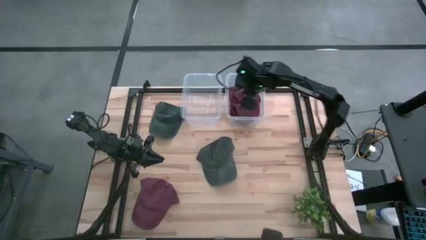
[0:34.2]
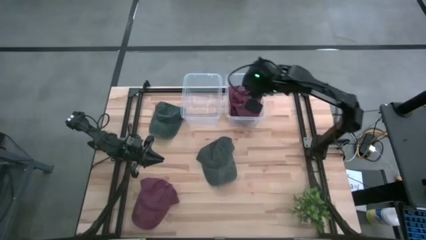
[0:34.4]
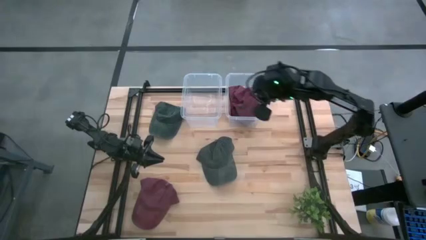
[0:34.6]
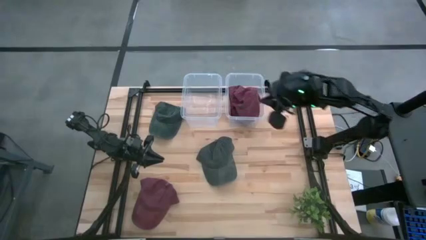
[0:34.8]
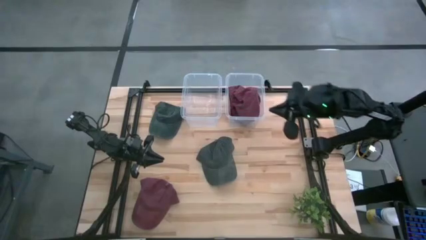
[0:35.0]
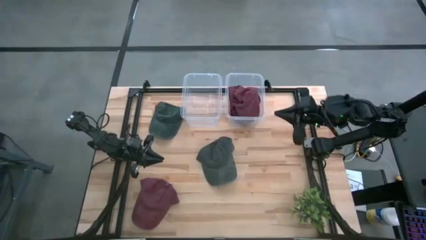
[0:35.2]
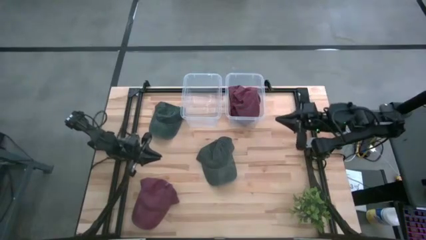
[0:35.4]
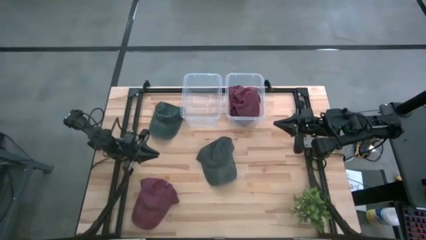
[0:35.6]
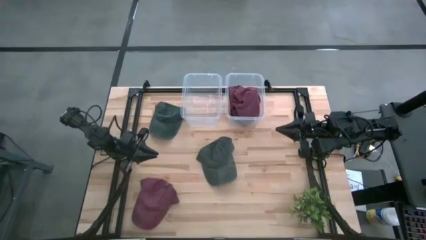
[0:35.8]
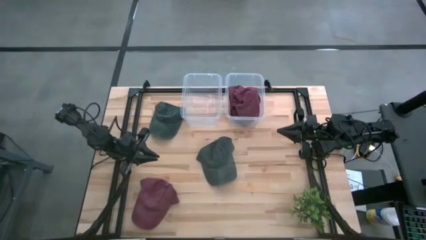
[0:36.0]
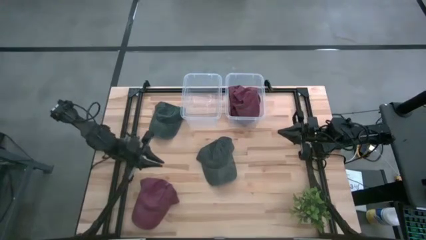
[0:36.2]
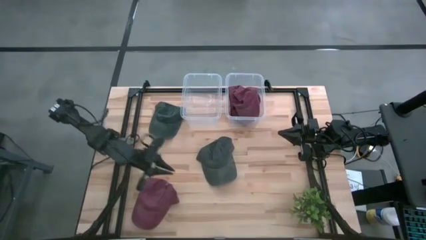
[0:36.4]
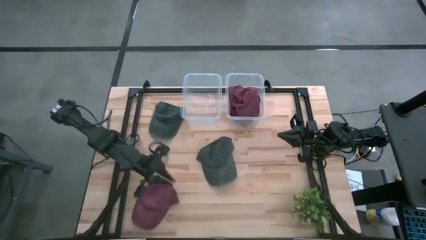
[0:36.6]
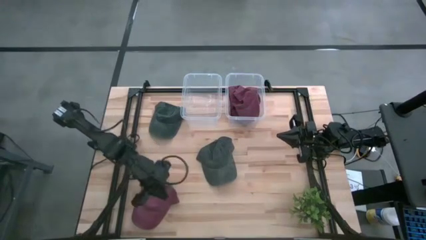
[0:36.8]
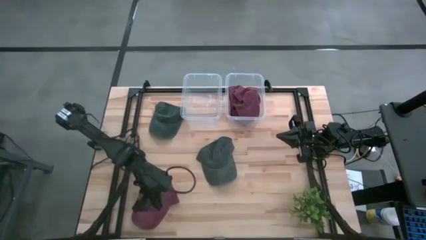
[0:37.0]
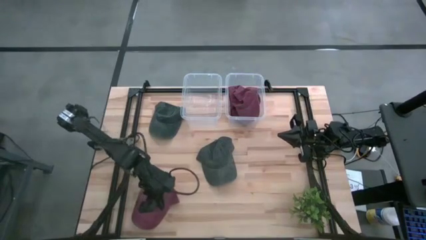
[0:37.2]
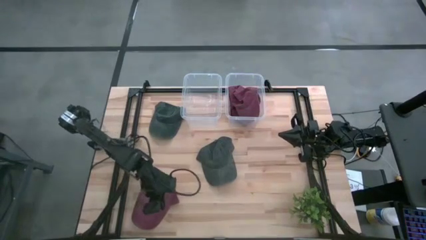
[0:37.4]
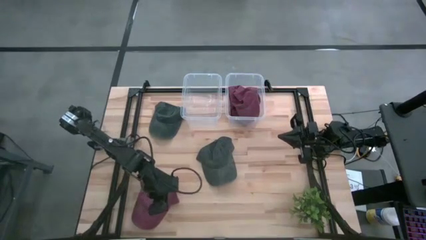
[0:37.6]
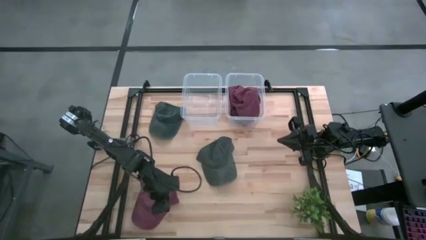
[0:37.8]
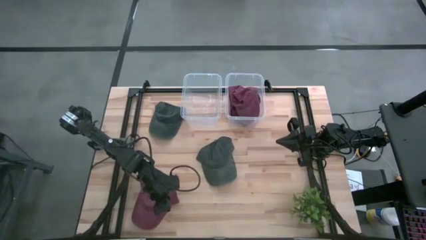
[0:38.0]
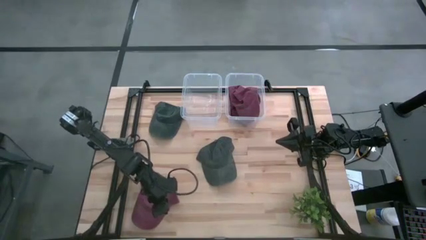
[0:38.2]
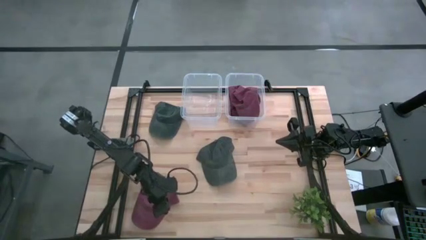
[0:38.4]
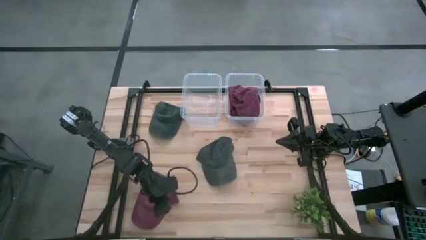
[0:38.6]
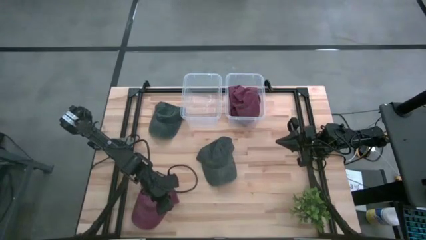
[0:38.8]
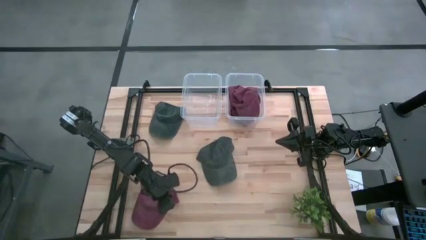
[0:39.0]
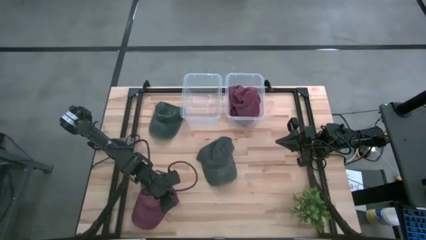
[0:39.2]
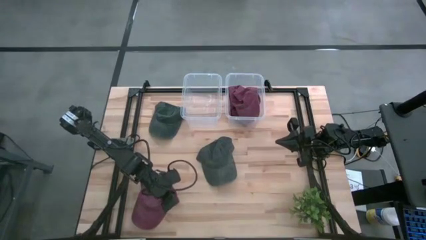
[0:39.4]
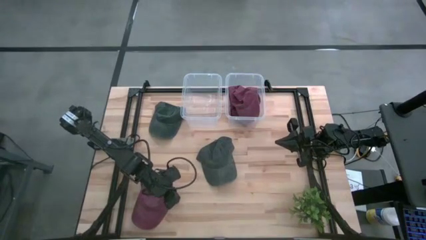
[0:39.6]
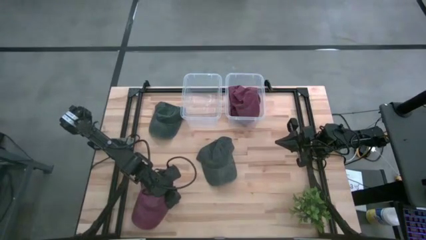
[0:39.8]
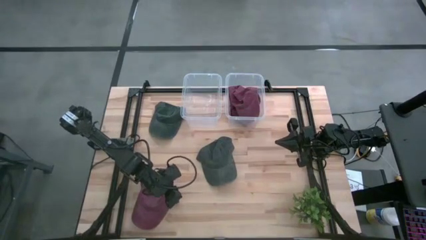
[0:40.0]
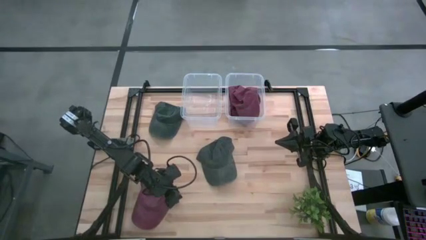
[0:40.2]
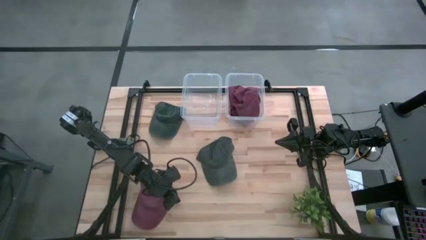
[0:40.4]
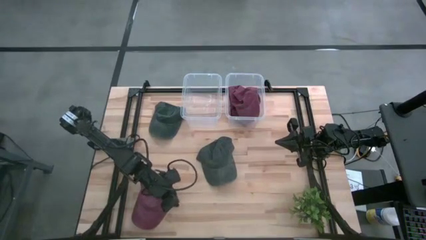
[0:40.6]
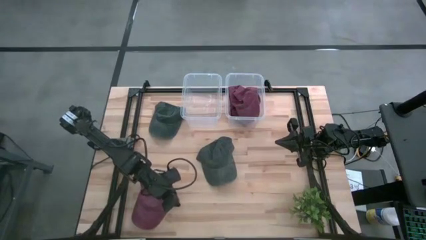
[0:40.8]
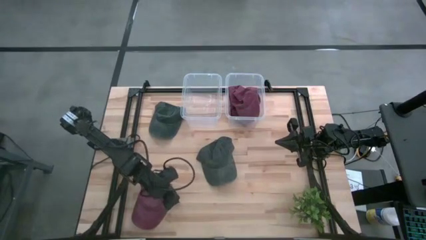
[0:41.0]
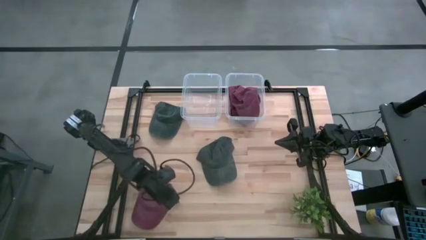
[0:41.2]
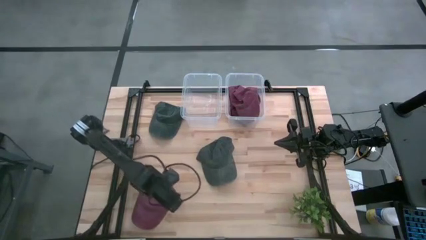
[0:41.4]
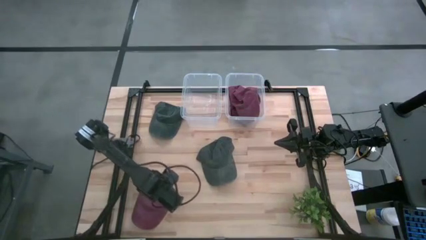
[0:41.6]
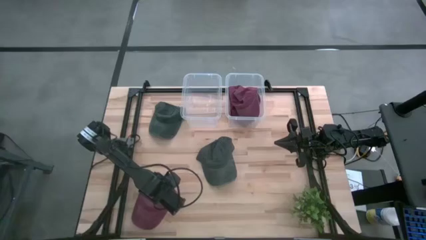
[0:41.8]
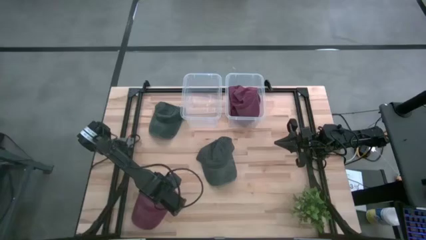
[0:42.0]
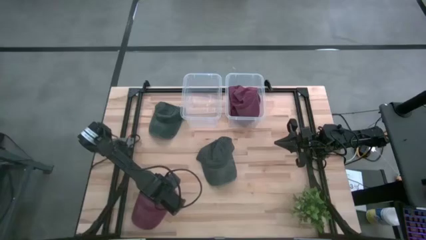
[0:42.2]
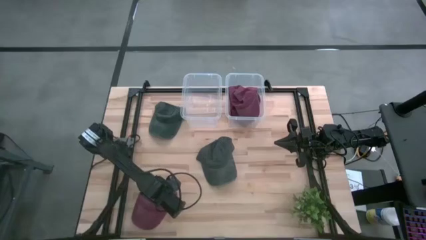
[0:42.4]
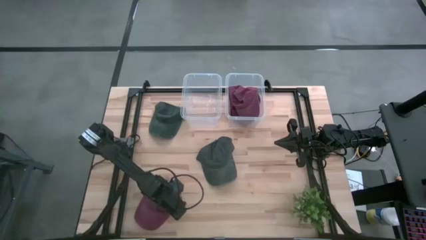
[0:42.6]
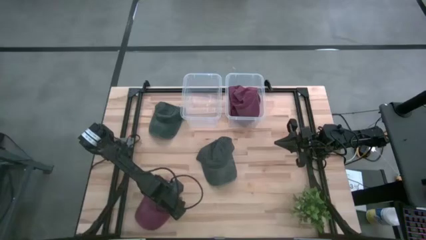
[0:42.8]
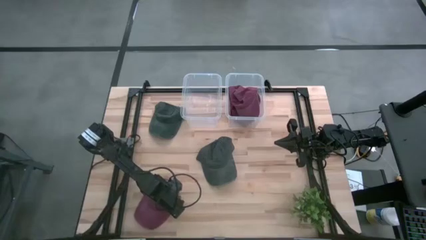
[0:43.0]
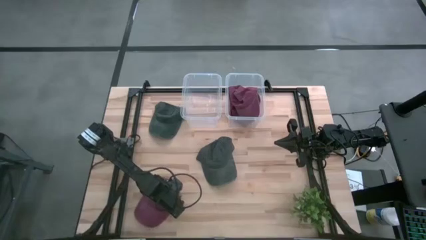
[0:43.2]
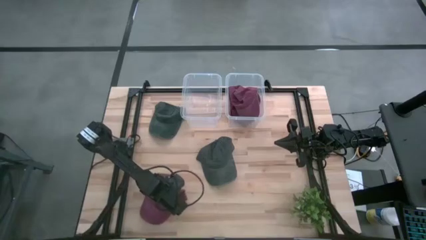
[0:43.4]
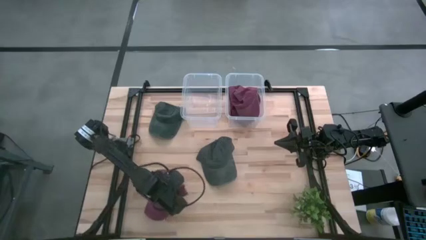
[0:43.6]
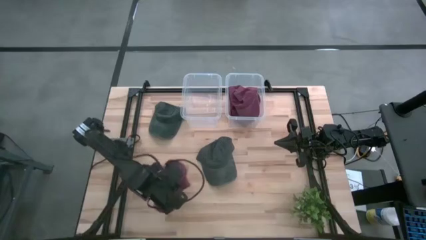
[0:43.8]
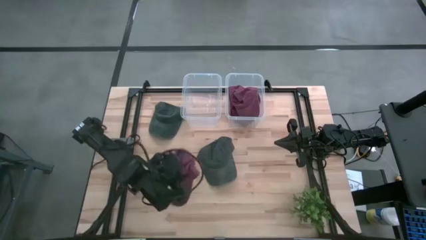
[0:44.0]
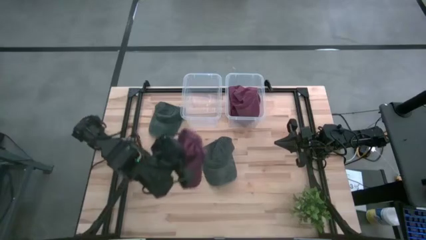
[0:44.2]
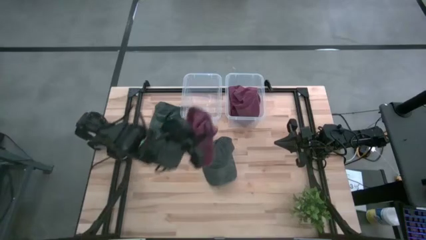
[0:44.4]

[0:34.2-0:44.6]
Task: Pick & Place hat
Put the red cap into the right transparent bin
